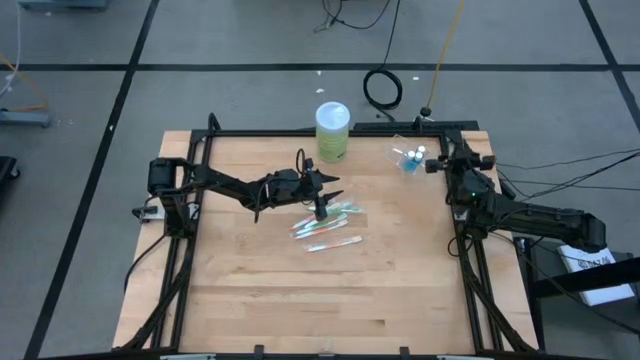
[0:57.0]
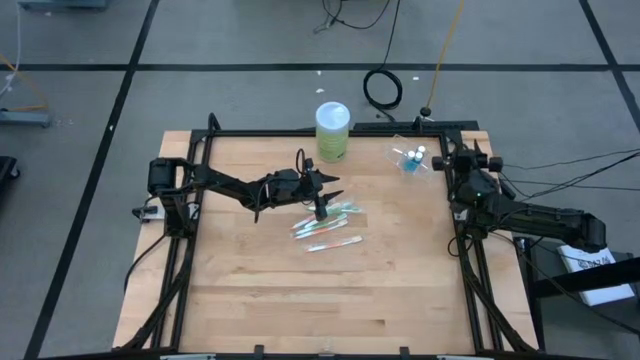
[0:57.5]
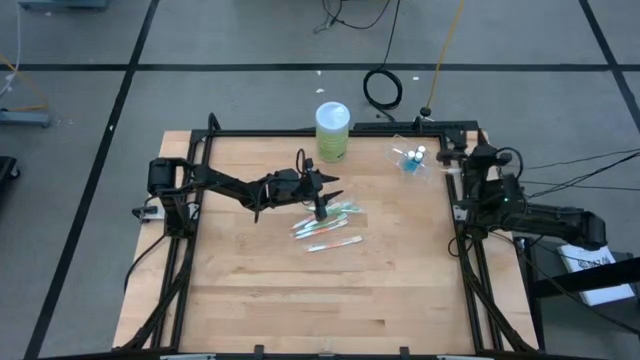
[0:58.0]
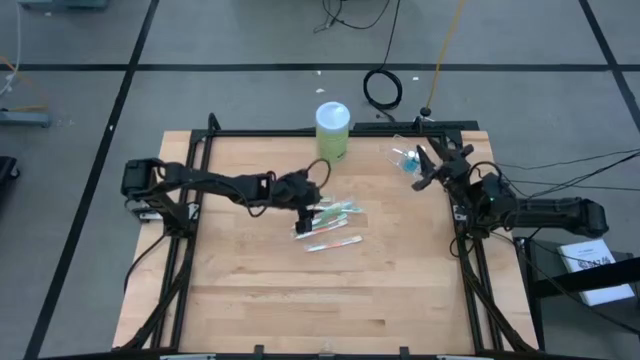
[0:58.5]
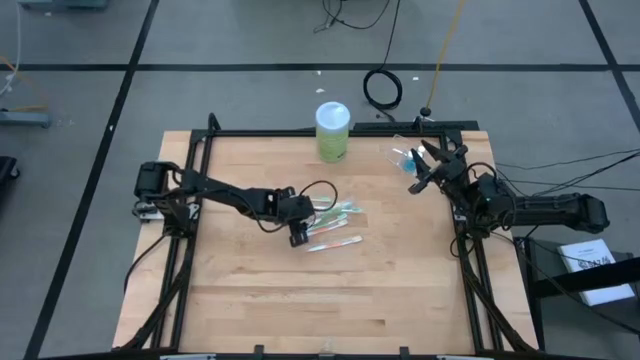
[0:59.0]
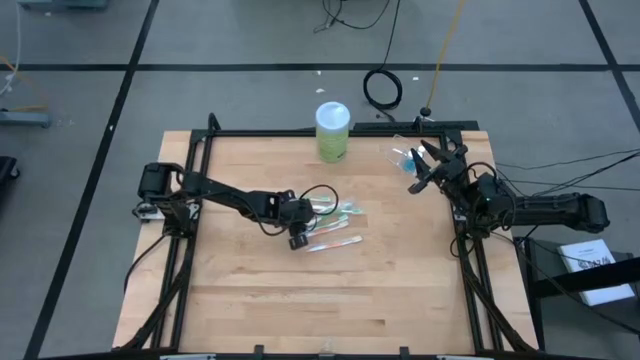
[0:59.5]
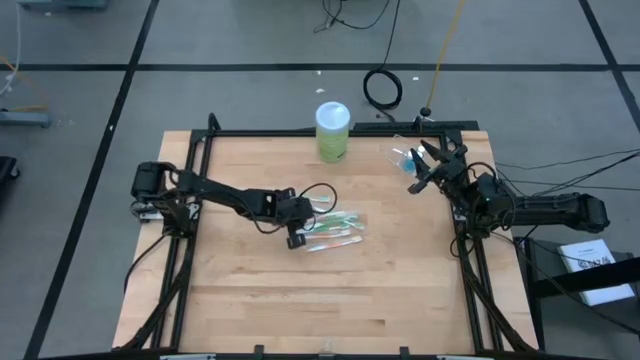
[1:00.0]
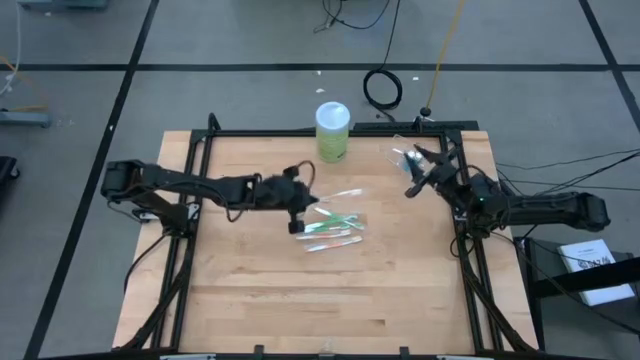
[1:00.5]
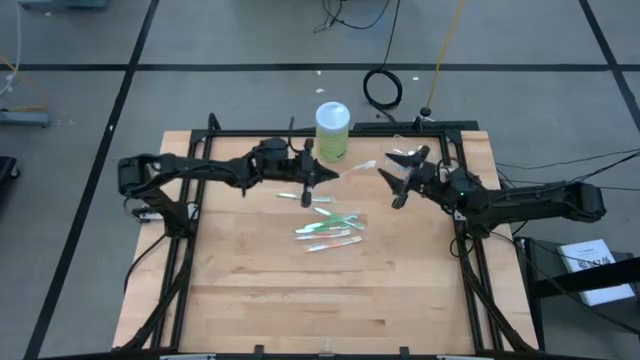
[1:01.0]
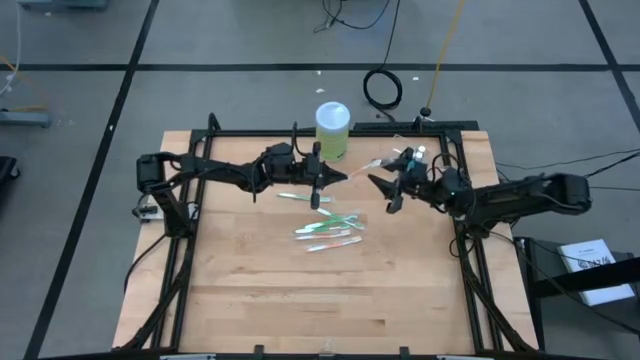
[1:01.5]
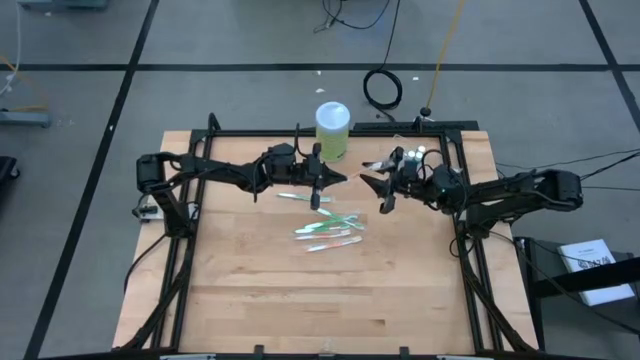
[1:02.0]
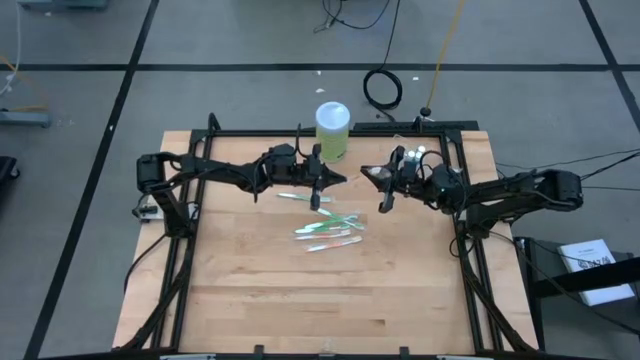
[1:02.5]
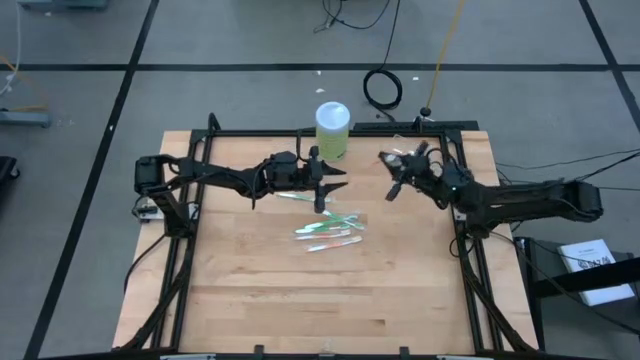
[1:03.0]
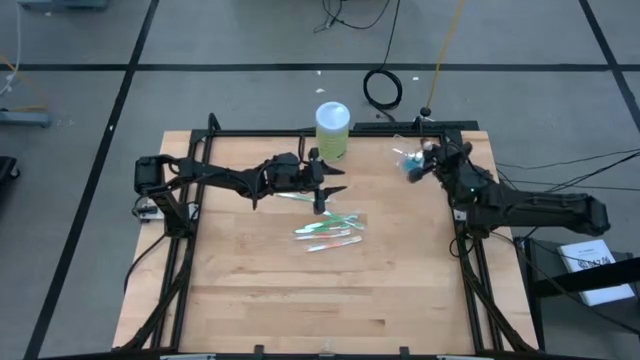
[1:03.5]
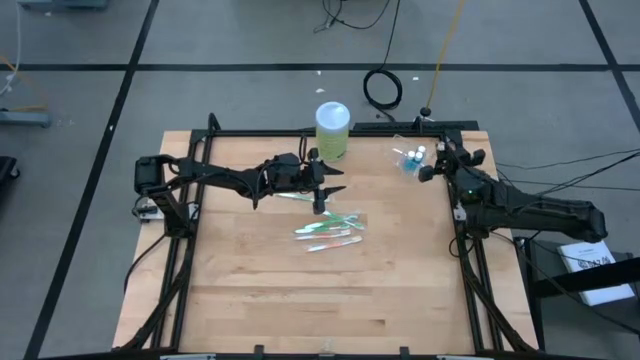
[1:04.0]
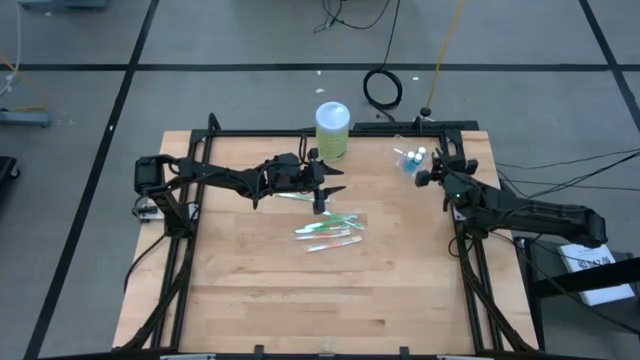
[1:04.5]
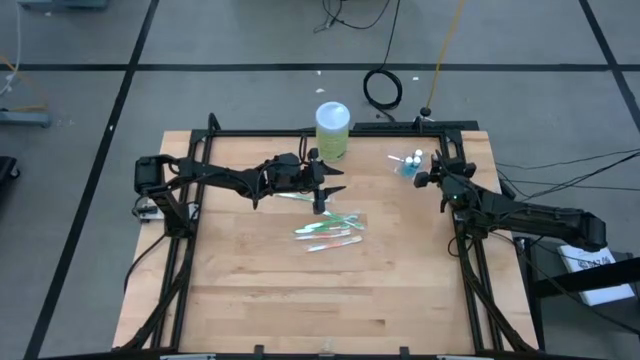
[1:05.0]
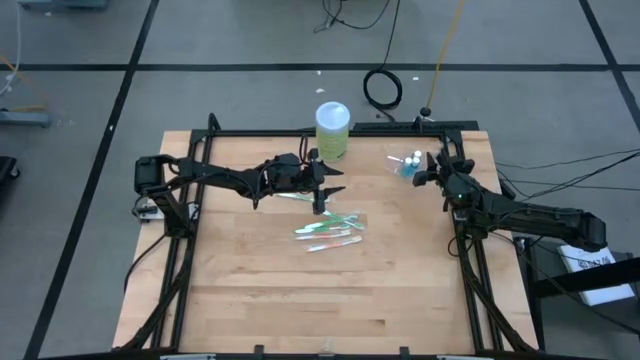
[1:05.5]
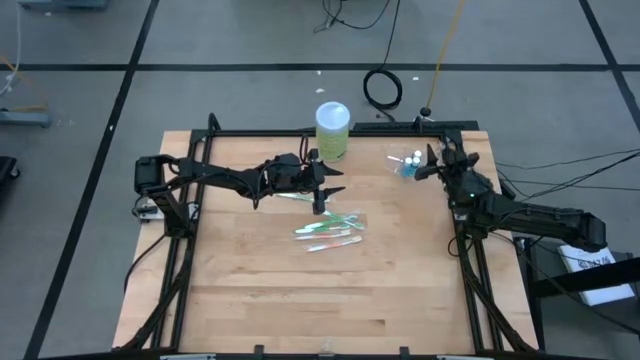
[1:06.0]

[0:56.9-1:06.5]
Task: Pick & Place toothbrushing station
Put the orange toothbrush into the transparent organizer

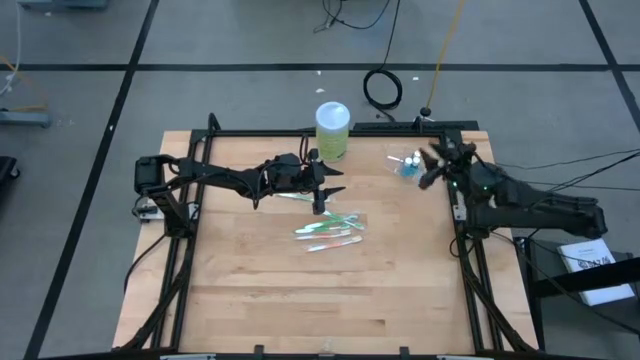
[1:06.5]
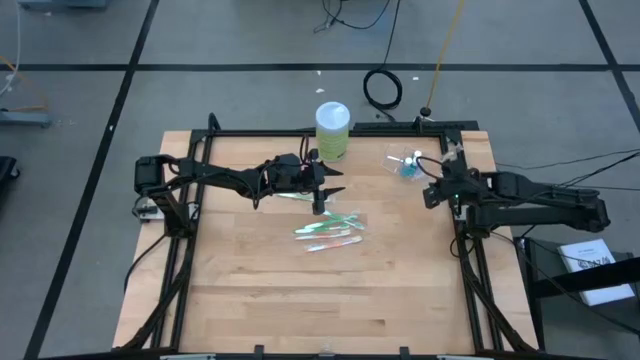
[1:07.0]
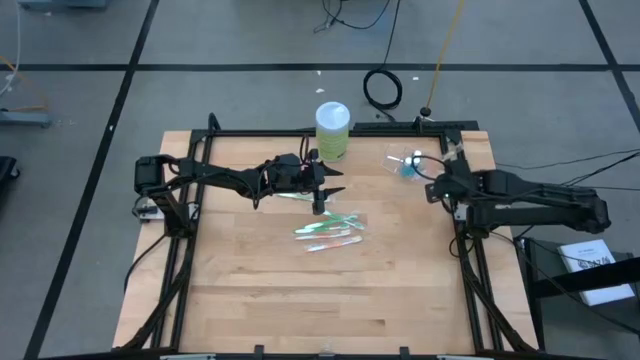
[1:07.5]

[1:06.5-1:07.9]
Adjust the orange toothbrush into the transparent organizer

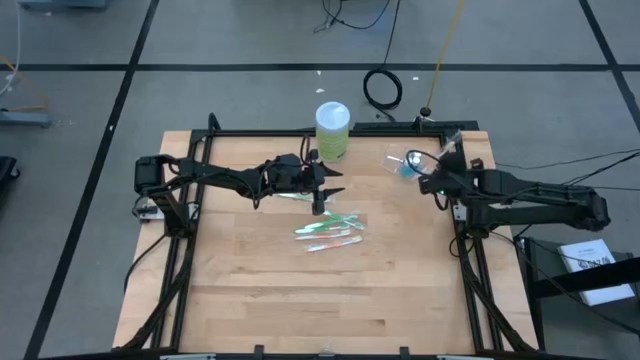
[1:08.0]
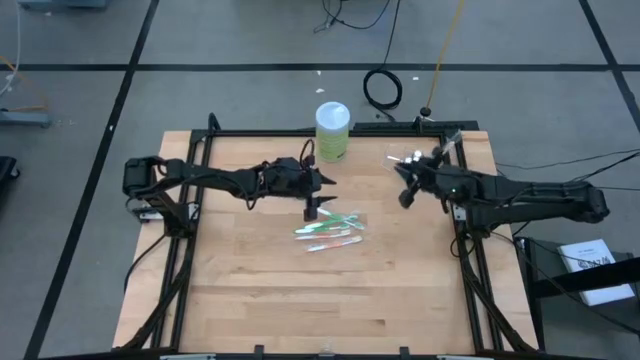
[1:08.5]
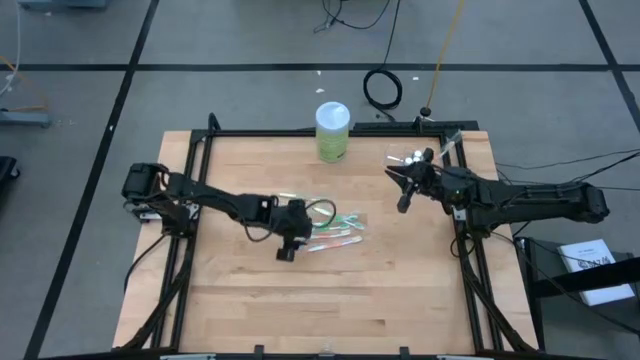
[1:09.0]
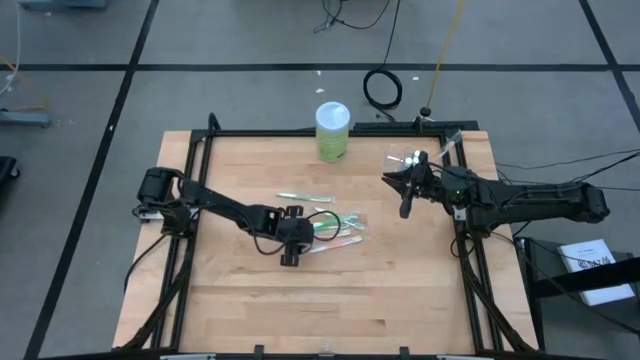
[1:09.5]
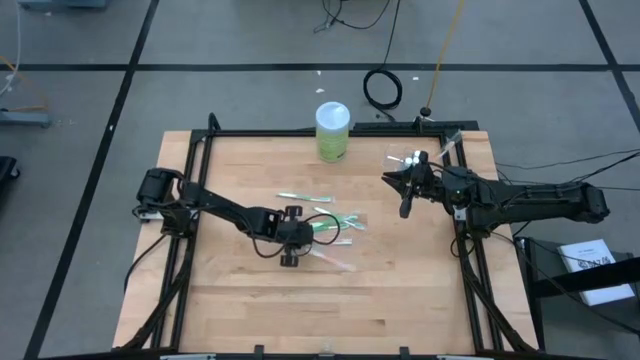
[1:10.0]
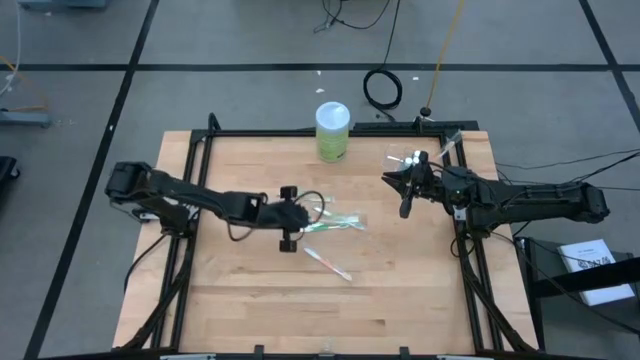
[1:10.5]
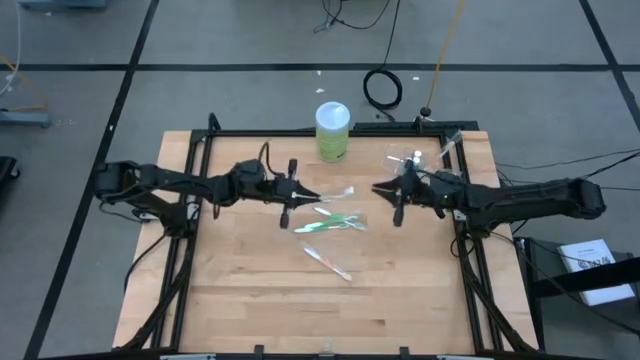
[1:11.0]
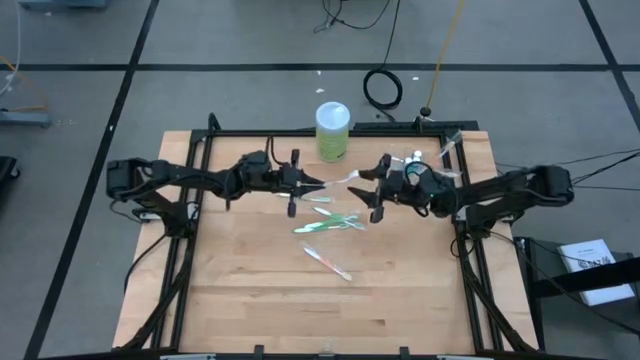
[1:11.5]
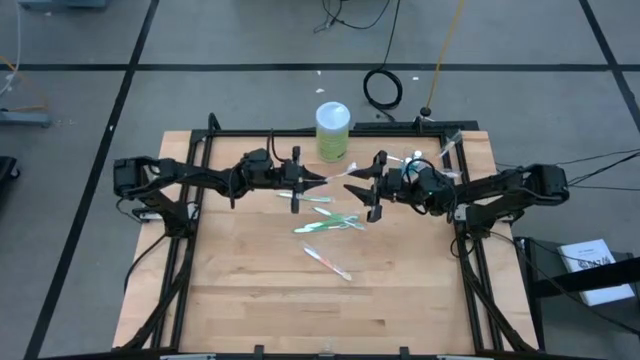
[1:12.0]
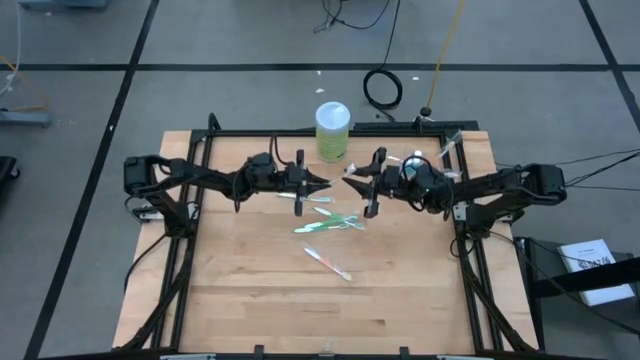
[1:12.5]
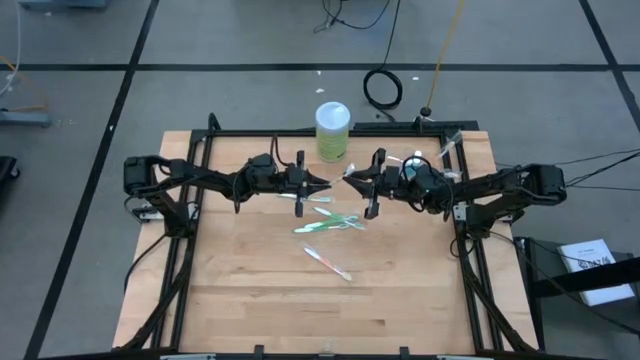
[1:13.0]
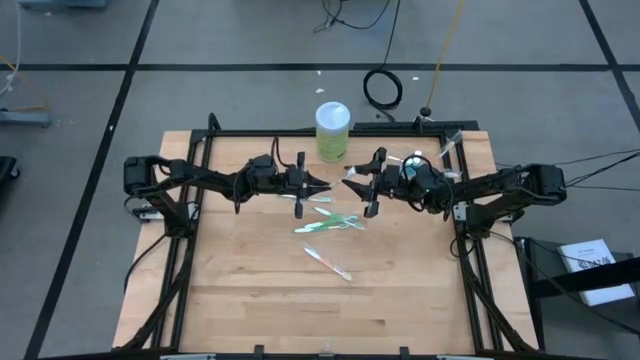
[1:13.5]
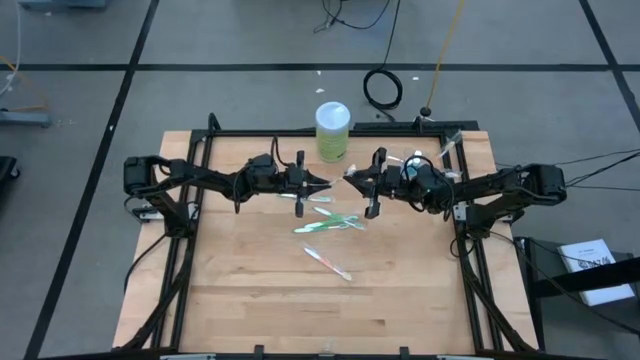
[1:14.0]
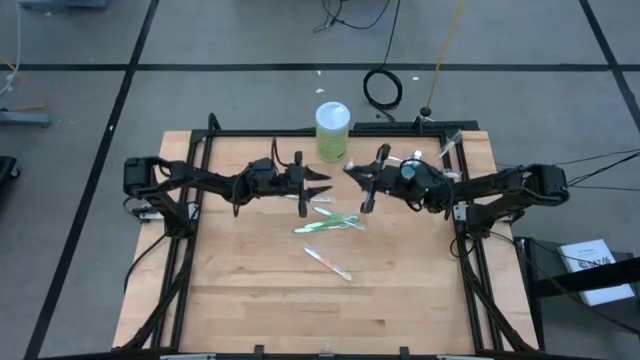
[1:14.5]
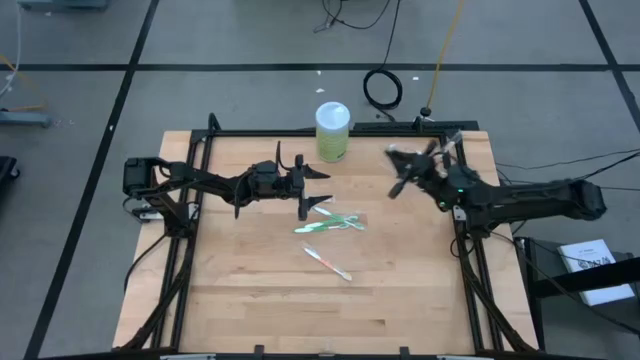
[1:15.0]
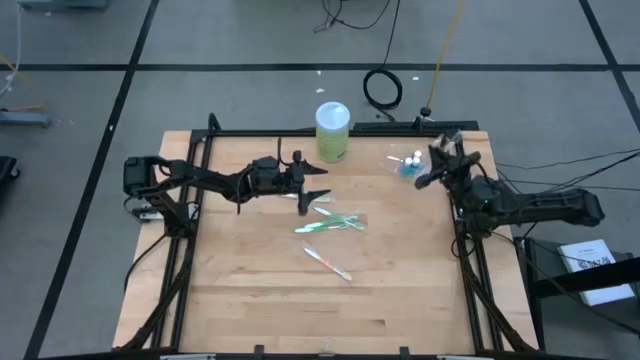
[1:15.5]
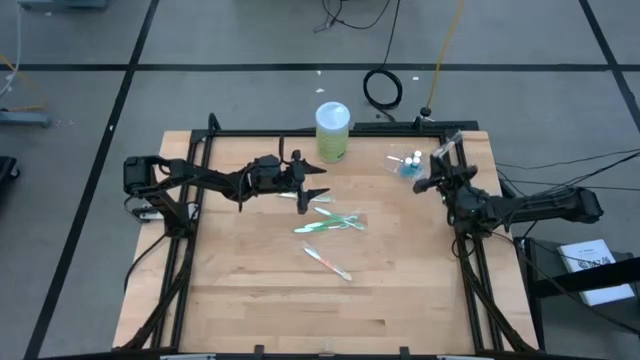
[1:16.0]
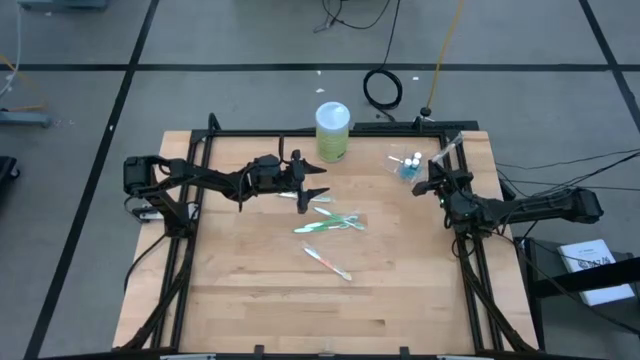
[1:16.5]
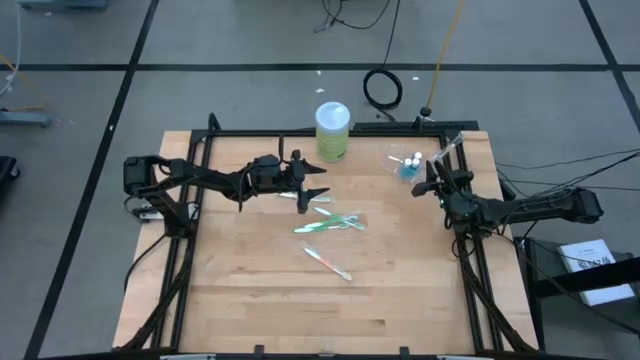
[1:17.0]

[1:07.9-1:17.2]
Put the orange toothbrush into the transparent organizer
